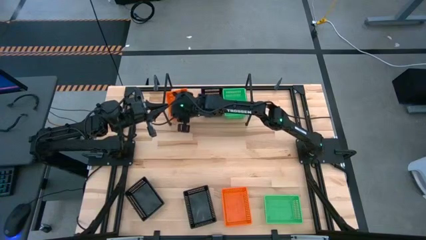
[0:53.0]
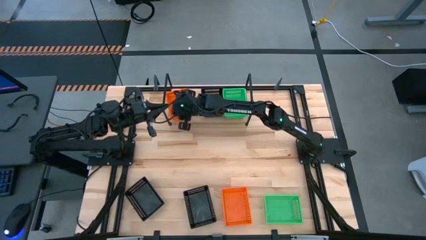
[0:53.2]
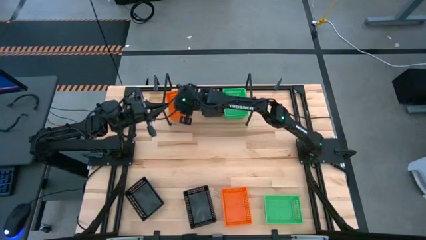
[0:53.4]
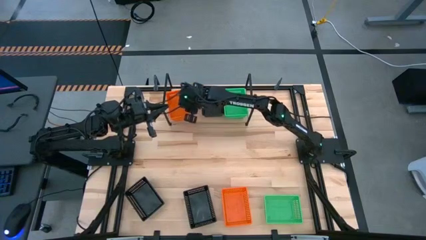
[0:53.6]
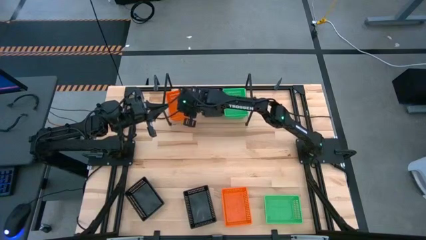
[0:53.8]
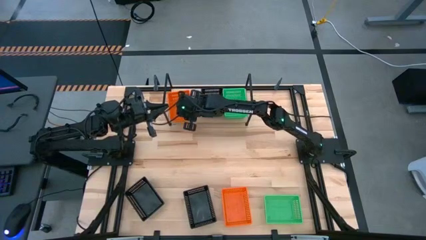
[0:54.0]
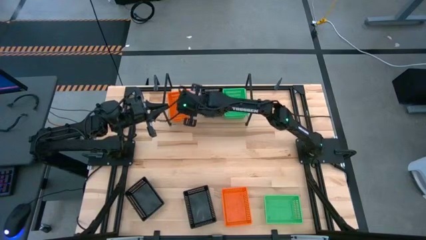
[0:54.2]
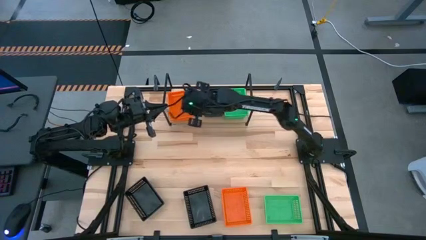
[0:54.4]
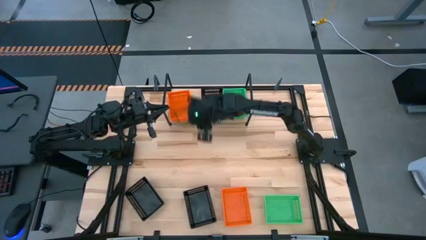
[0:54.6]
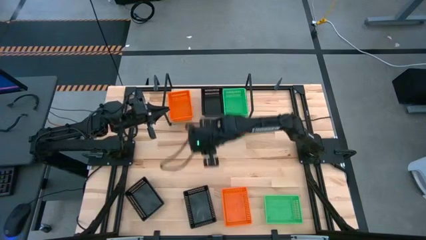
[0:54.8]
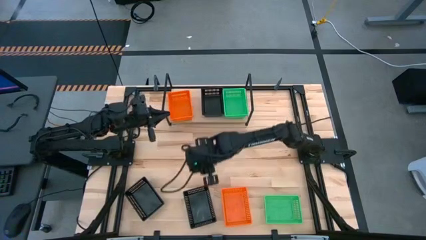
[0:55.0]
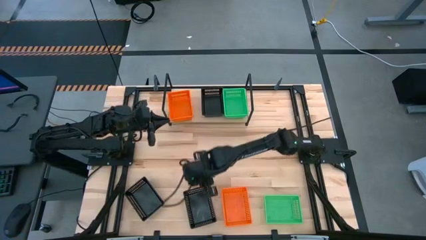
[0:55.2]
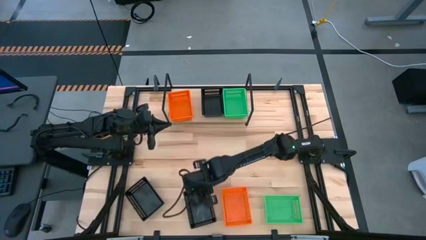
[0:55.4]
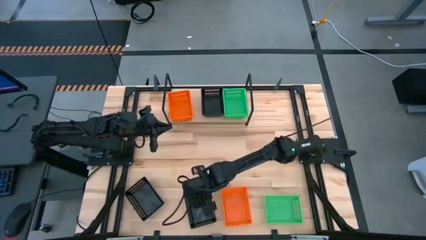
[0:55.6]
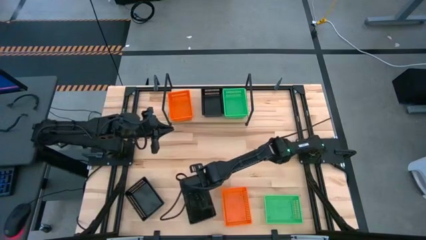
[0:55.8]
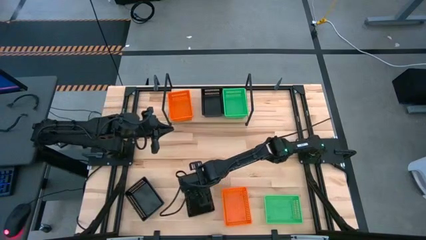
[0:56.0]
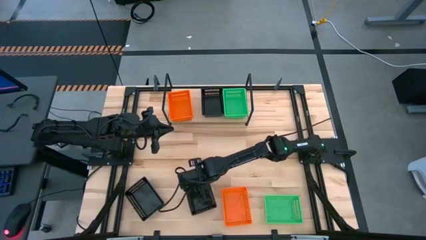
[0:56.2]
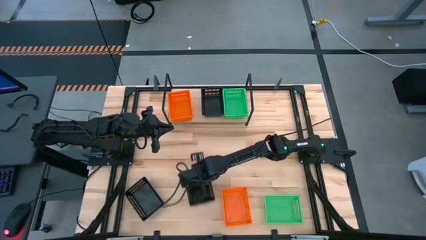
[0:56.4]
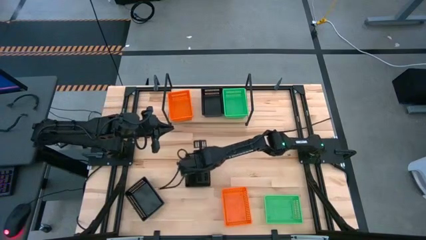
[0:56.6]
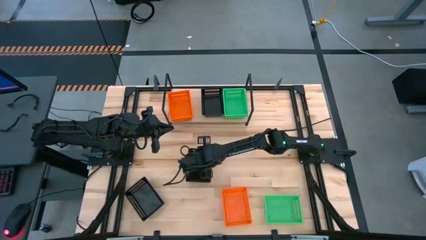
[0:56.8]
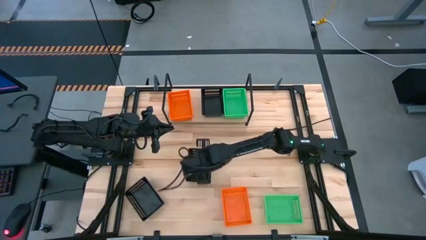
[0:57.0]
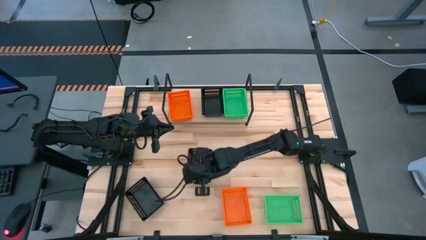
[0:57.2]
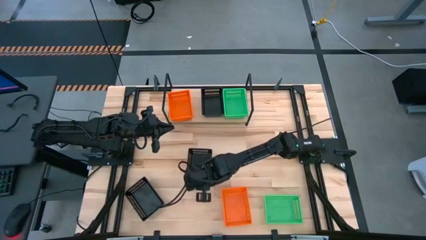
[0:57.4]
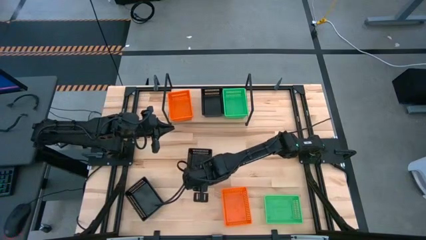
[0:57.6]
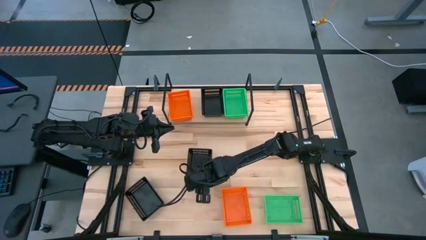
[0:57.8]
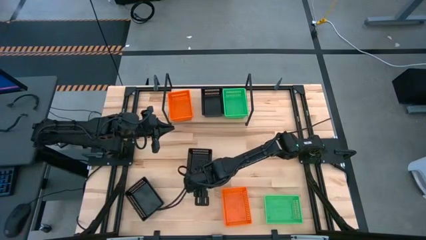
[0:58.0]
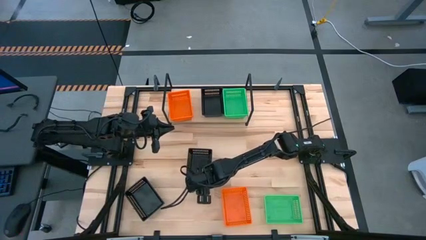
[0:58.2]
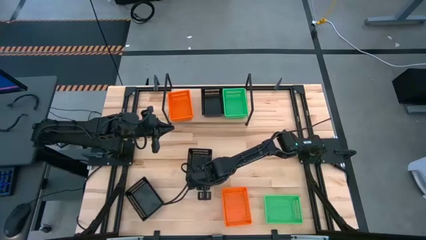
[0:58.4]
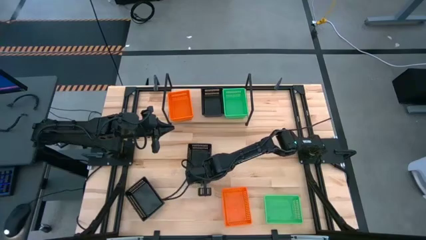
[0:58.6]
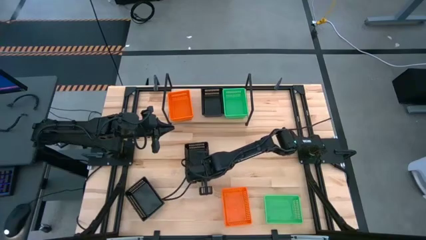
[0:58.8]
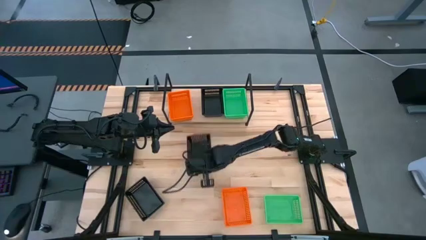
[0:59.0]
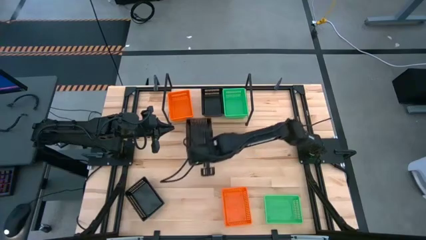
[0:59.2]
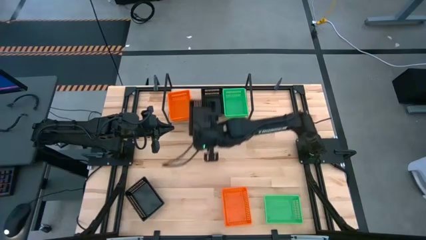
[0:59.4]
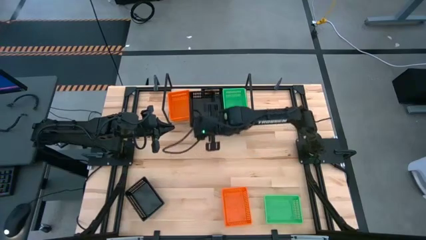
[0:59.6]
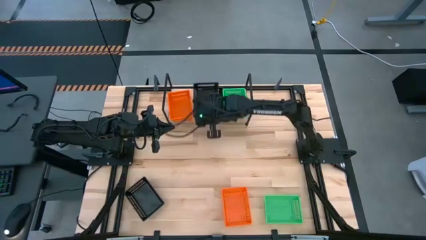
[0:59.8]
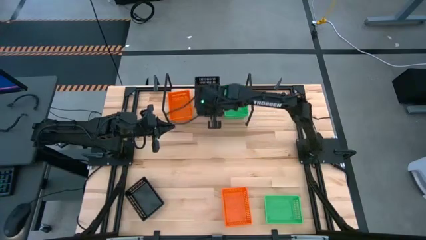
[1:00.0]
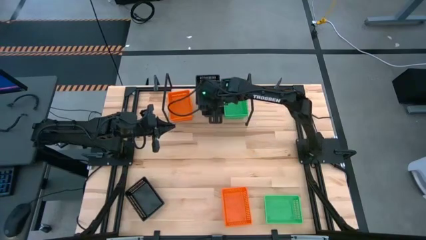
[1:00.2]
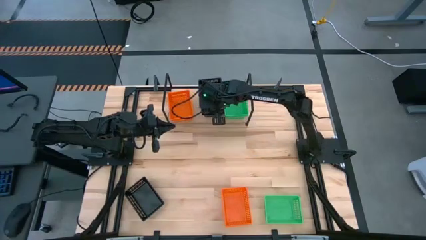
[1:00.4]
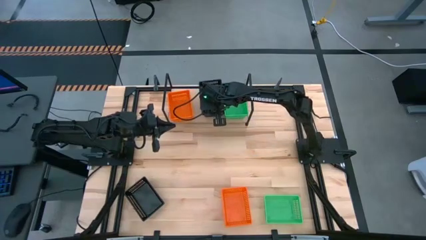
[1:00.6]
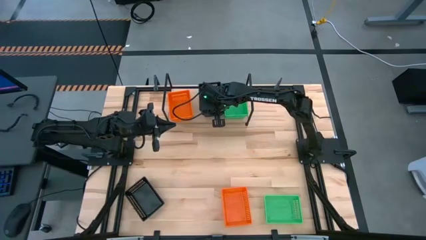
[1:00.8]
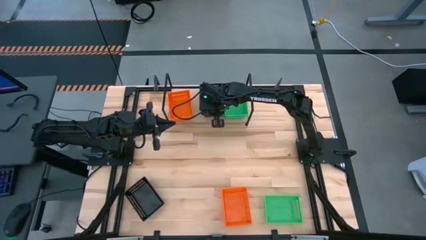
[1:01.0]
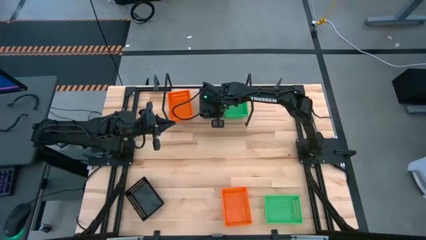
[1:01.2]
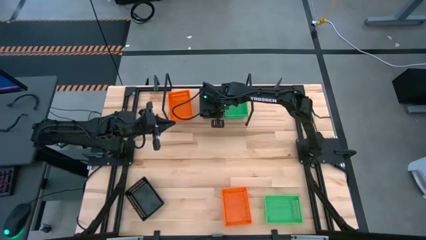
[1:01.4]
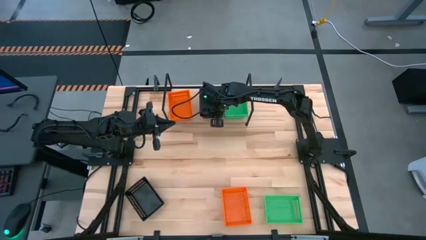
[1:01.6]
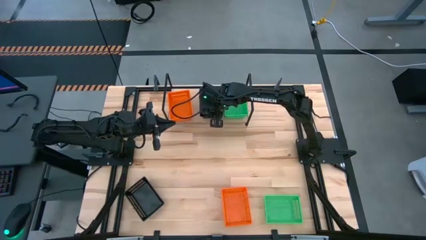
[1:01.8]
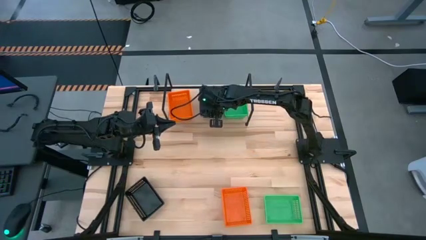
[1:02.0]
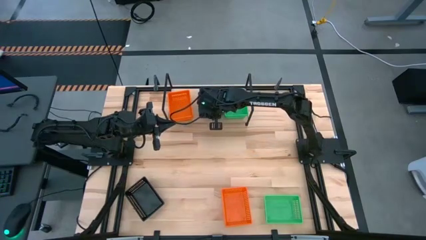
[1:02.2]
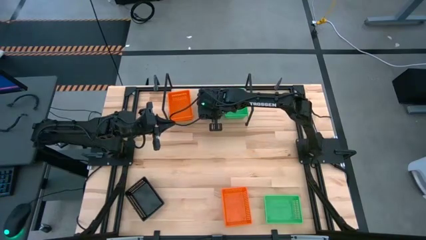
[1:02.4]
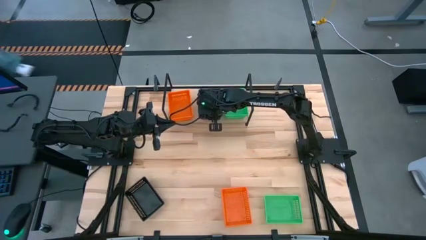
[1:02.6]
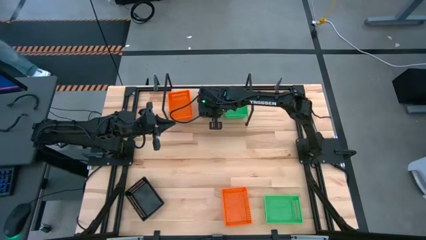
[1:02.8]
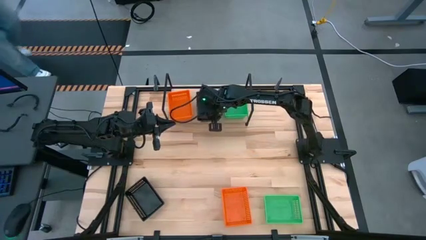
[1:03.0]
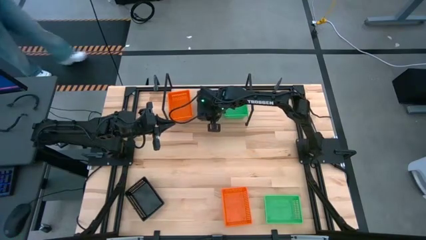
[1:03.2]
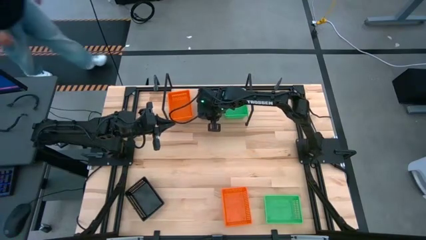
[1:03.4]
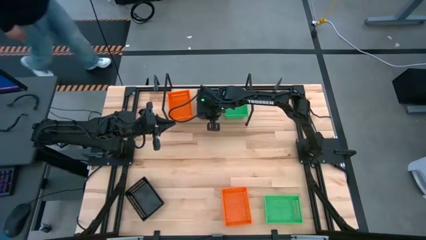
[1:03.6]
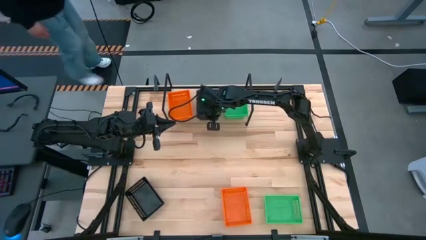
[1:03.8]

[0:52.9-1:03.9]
Task: Stack baskets on shelf by color
Stack the right black bin on top of the black bin on the shelf
